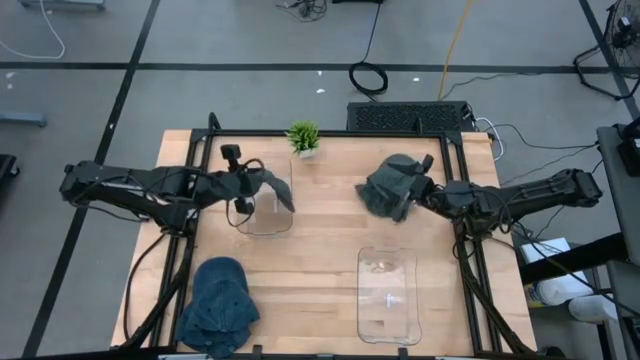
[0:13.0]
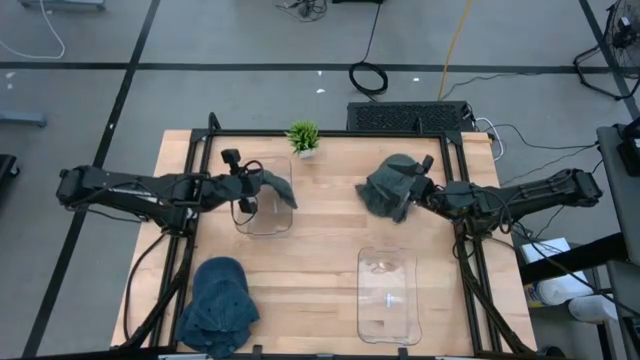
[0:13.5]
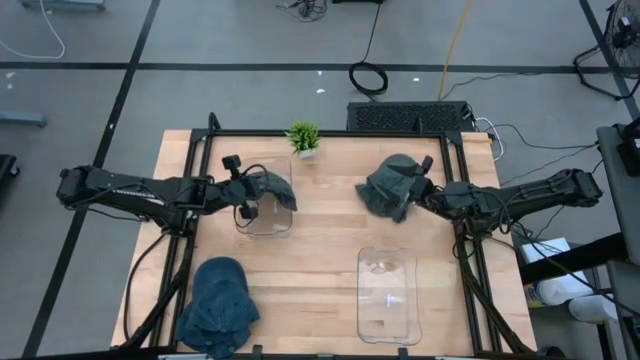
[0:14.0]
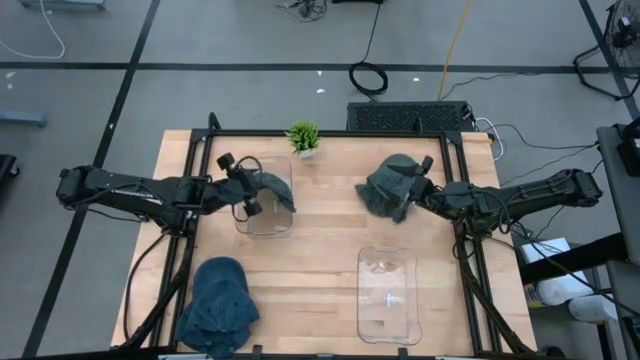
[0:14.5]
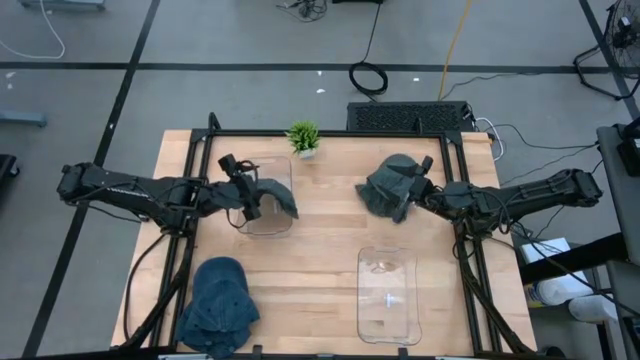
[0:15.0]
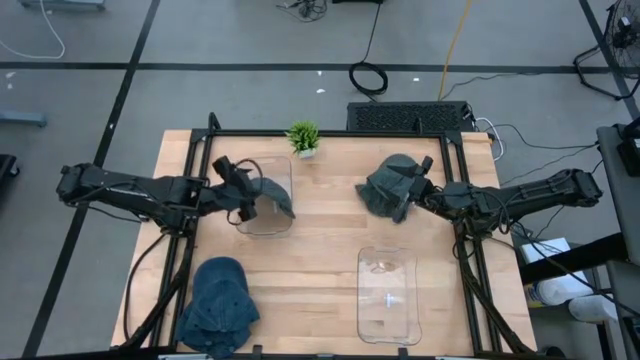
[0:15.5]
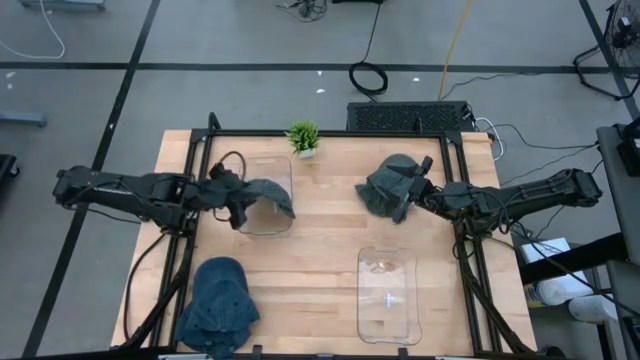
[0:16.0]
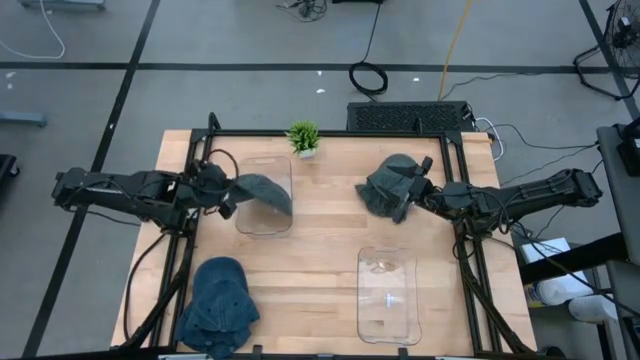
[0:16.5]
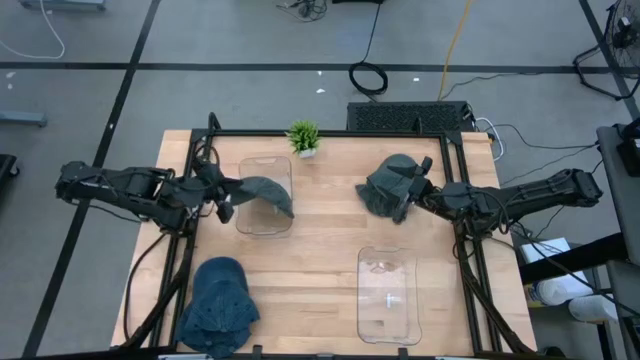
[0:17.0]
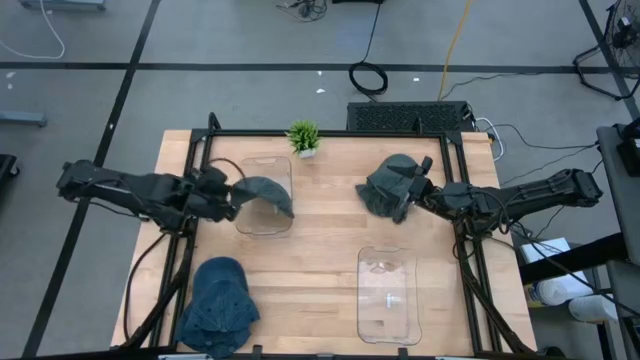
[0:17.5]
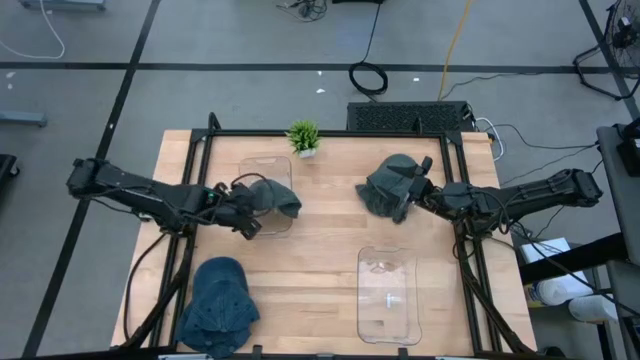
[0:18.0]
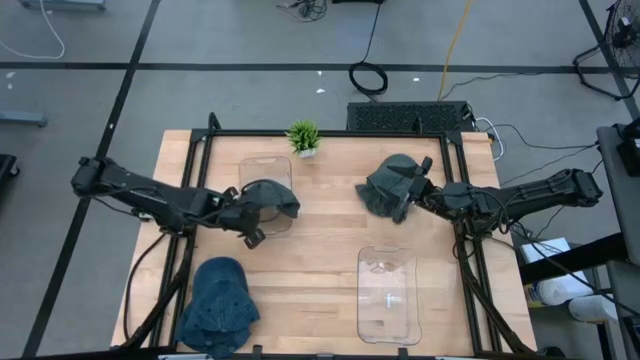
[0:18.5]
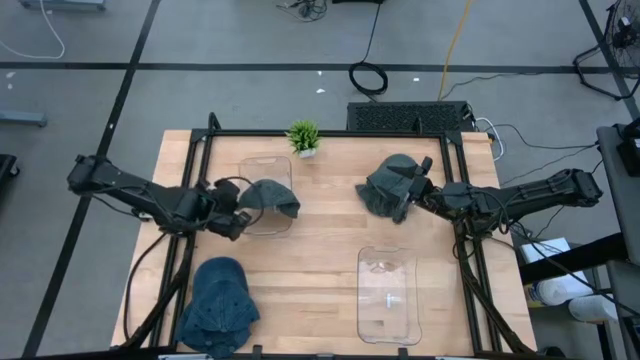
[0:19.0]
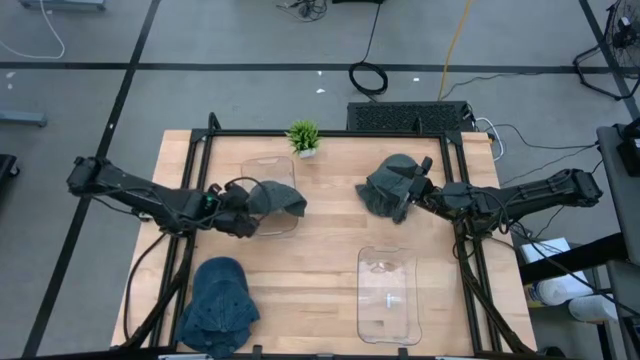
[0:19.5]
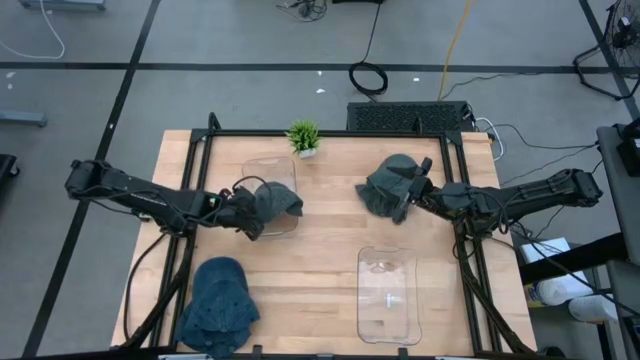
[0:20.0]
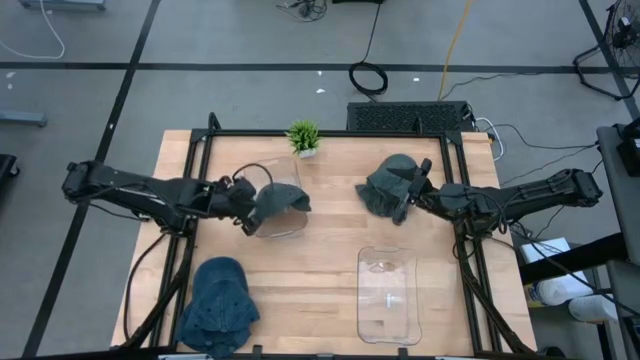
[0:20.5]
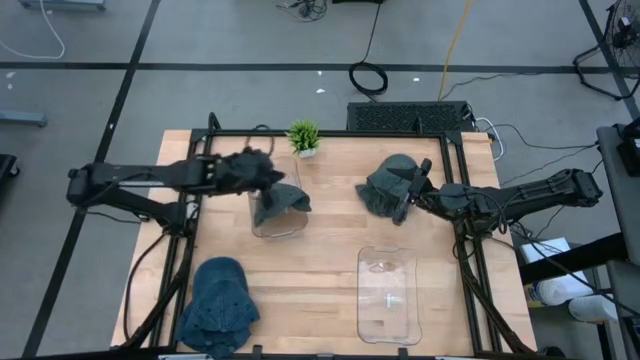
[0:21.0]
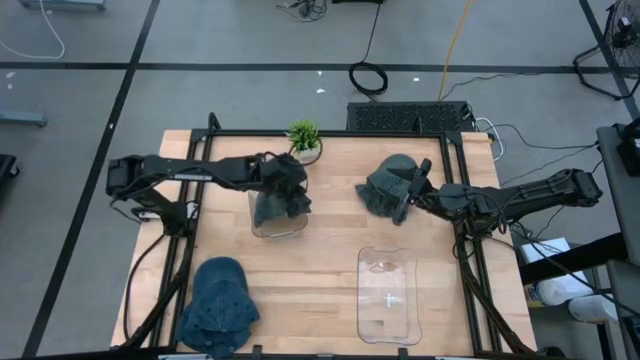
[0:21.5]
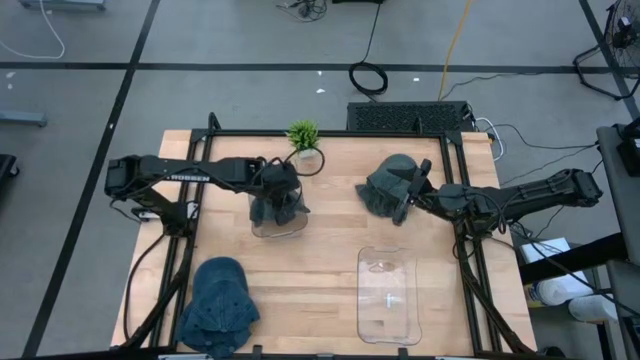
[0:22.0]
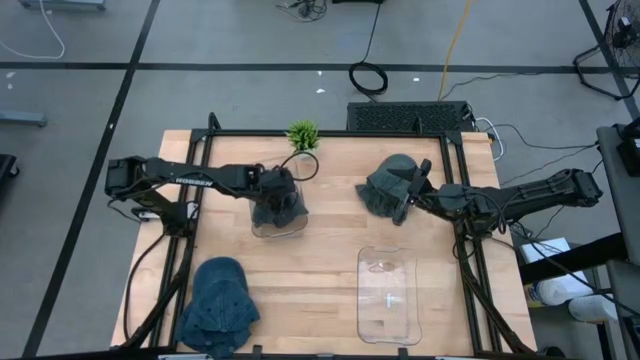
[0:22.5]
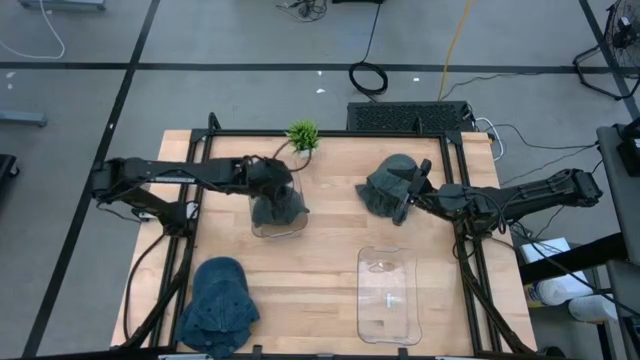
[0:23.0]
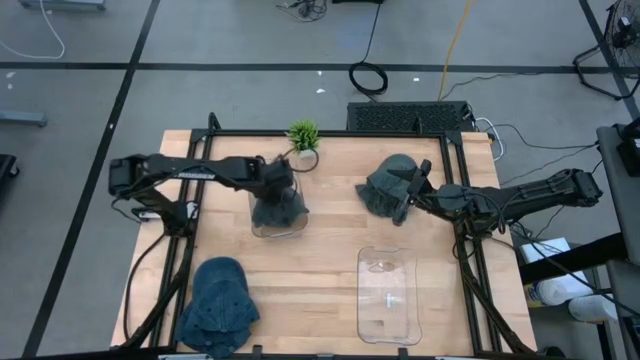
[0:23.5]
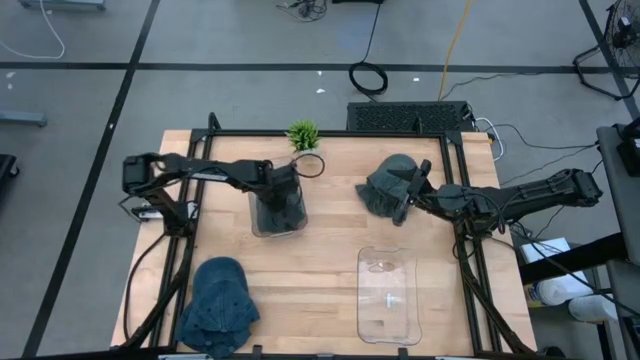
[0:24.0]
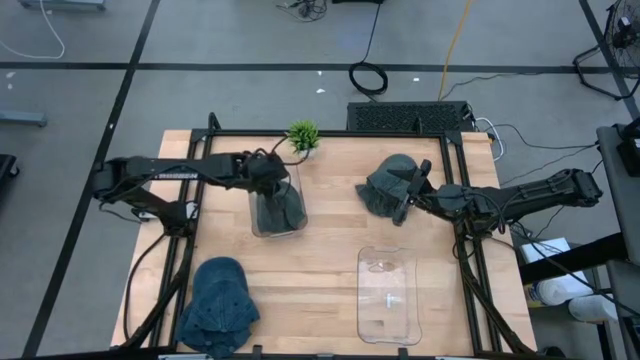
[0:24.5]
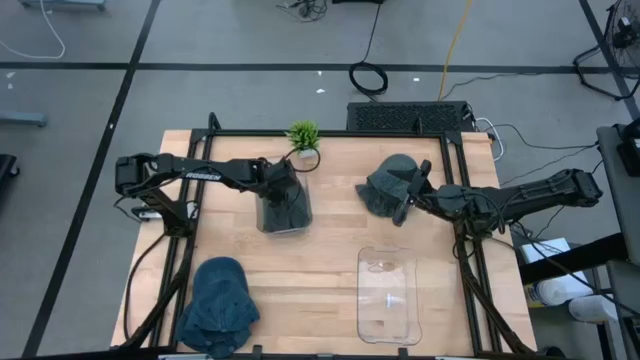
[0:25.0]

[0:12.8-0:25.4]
Task: Pick & Place hat
Put the black cap into the top transparent bin

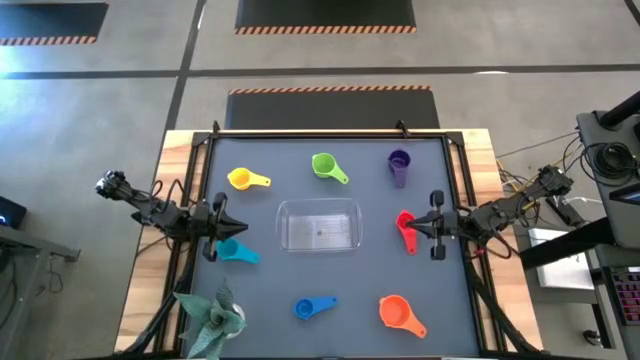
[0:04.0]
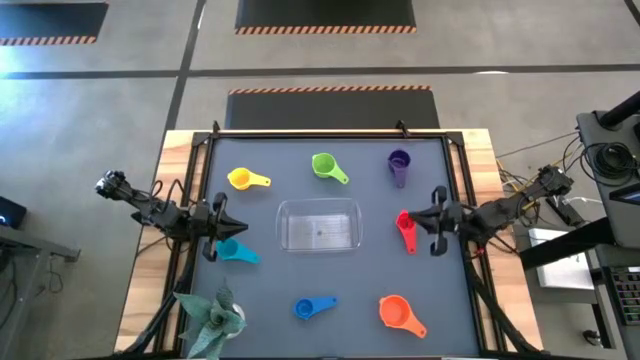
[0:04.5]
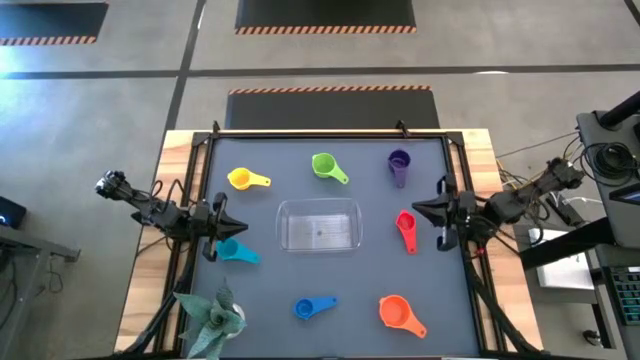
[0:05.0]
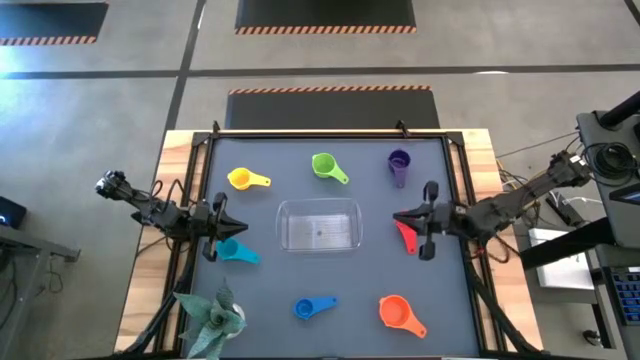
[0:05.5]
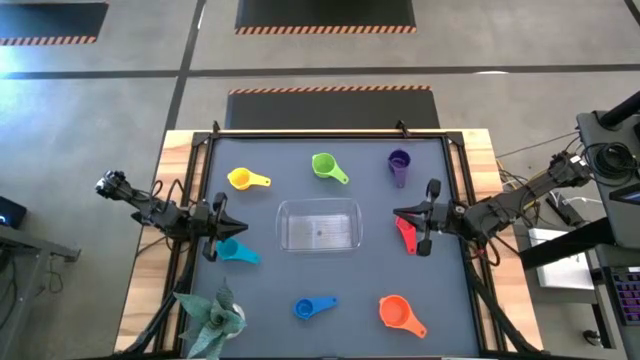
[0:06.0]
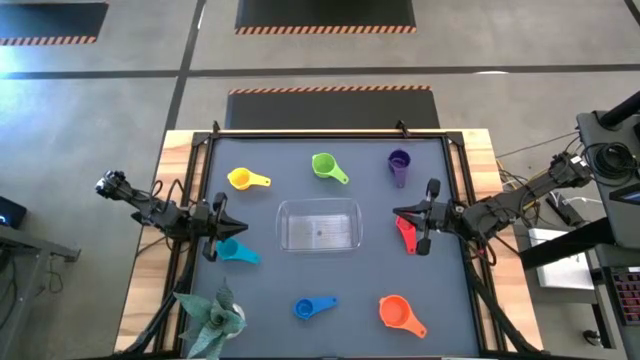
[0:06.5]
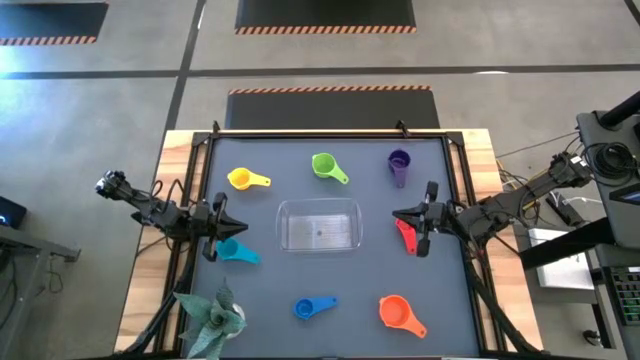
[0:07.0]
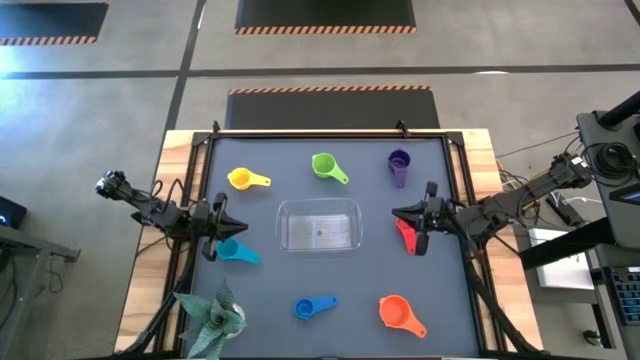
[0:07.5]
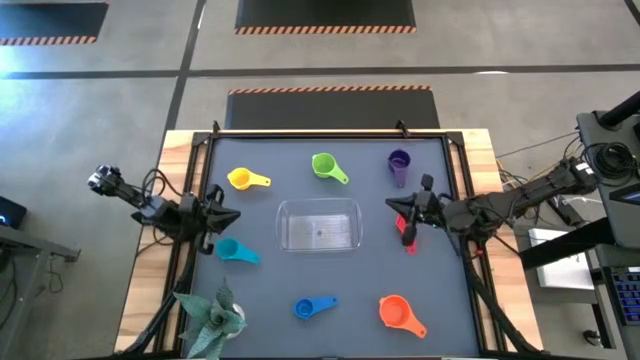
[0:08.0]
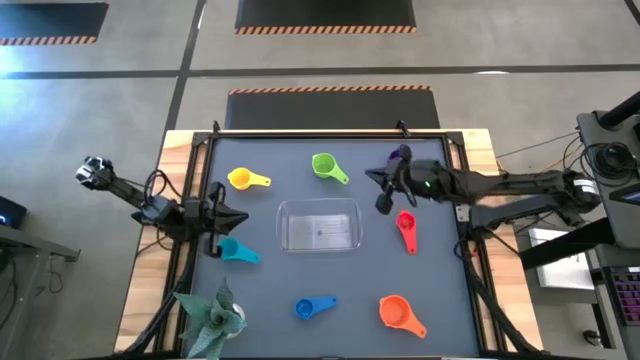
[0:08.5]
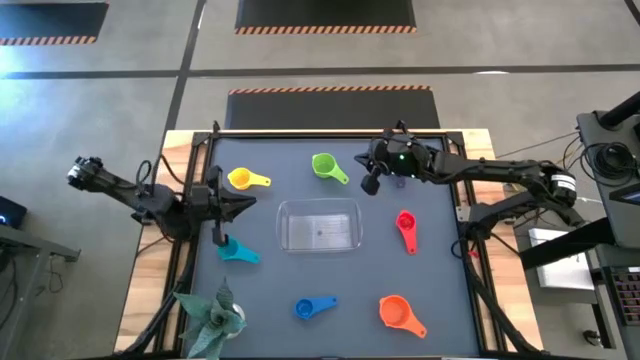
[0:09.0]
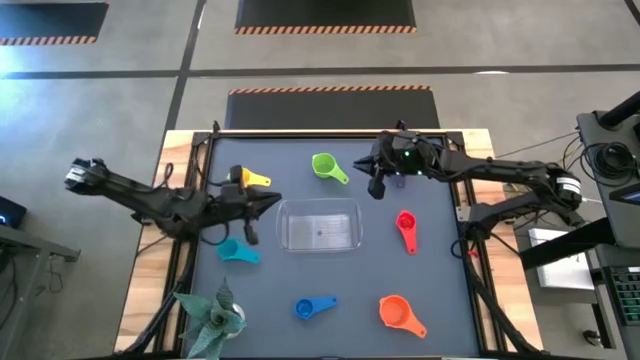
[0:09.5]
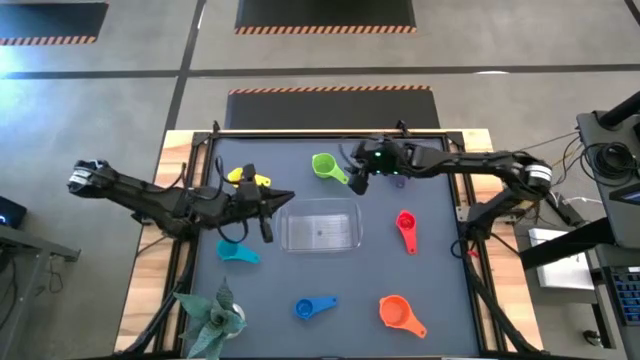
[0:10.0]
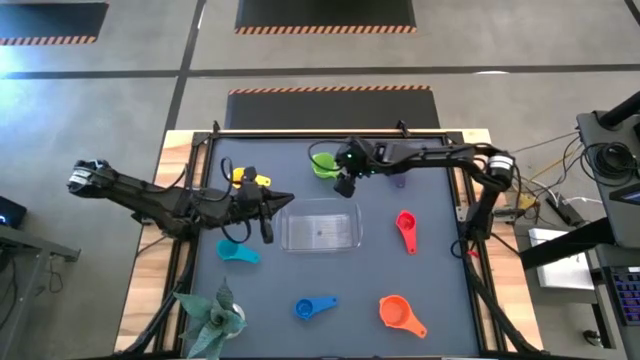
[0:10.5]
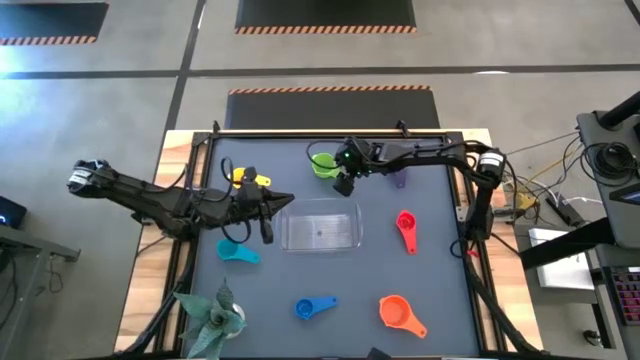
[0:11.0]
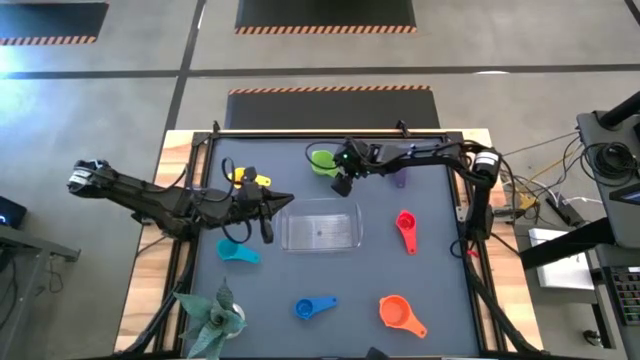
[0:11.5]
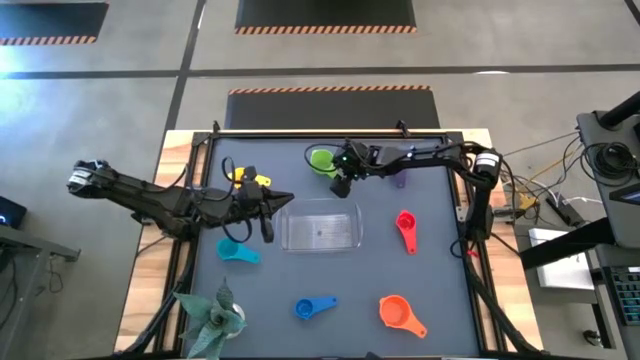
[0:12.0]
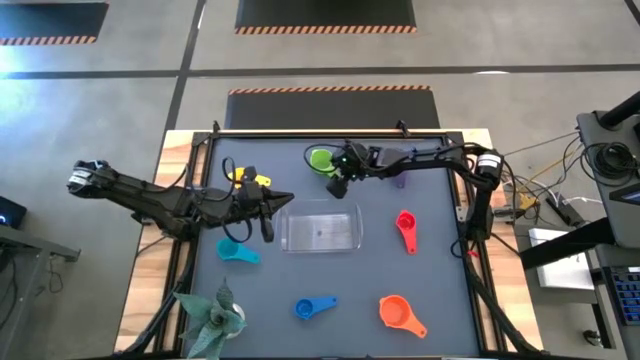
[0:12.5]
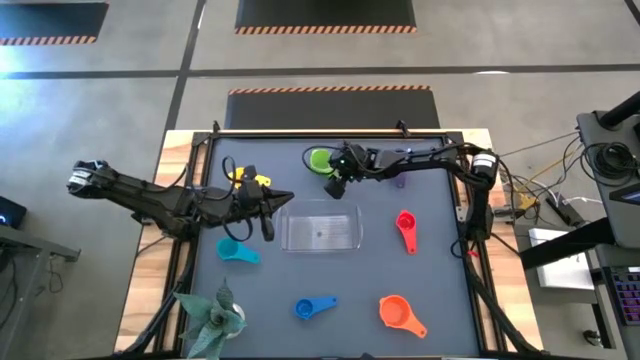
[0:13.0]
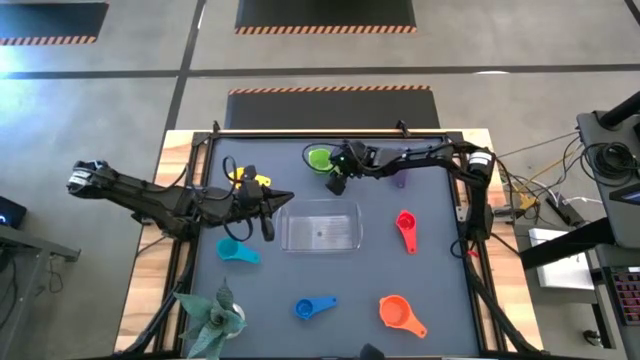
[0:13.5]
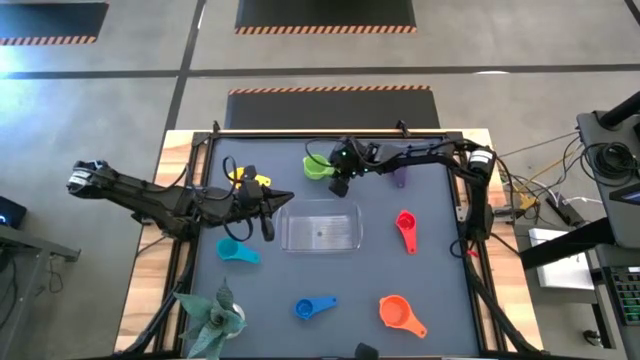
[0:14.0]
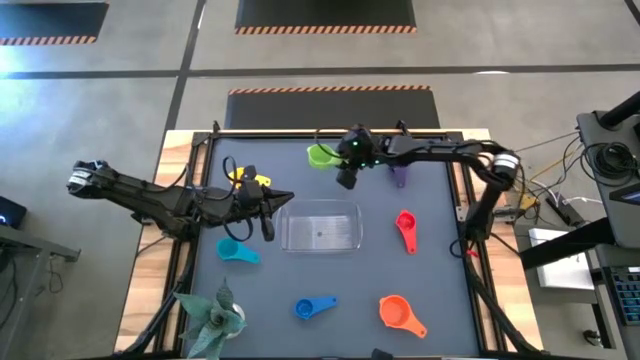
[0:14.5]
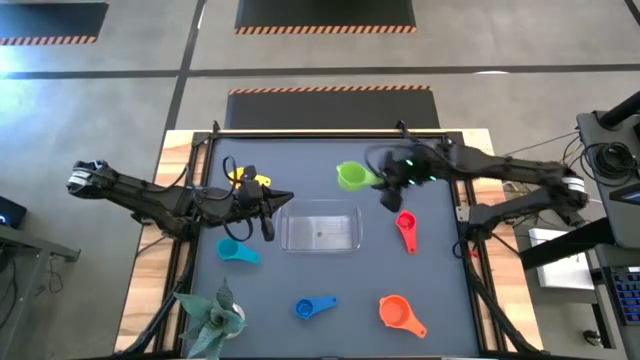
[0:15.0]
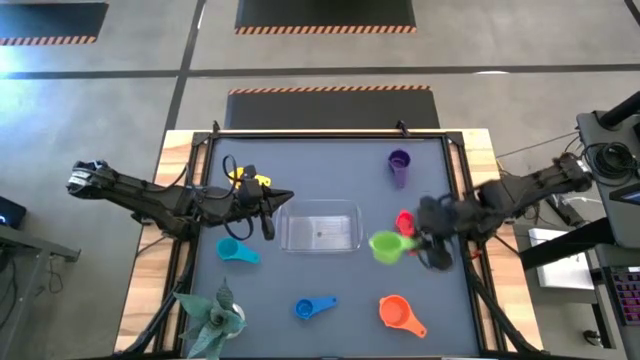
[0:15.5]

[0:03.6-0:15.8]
Task: Nest measuring cups in basket
Stack the green measuring cup on top of the orange measuring cup
